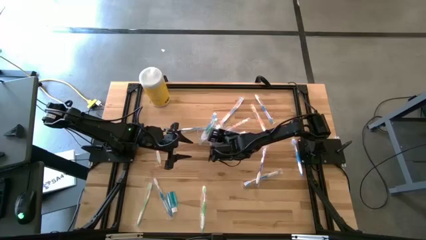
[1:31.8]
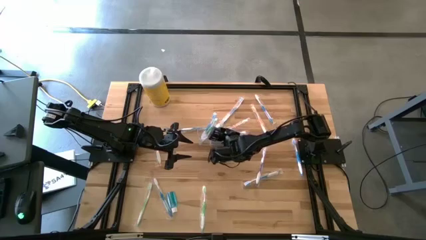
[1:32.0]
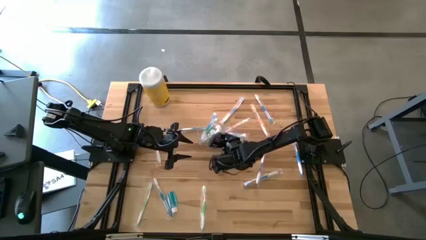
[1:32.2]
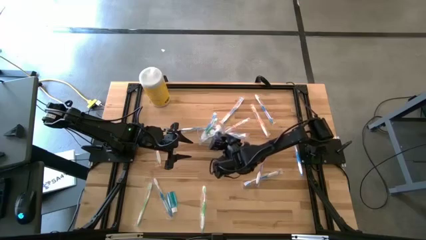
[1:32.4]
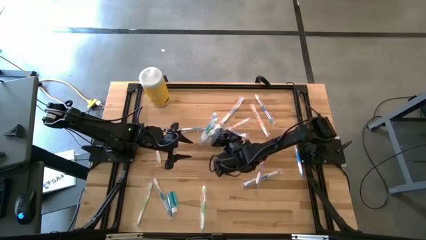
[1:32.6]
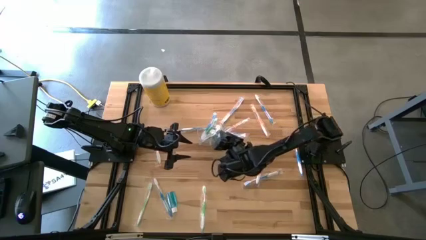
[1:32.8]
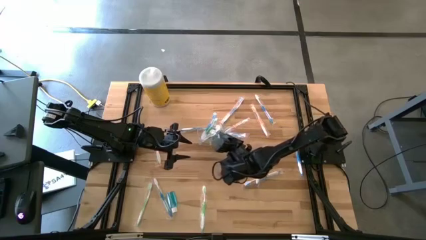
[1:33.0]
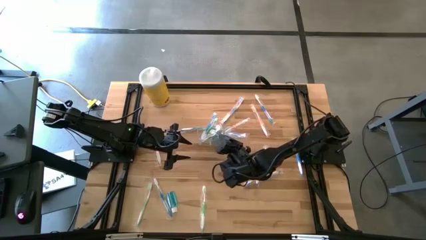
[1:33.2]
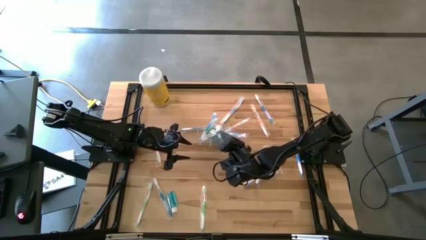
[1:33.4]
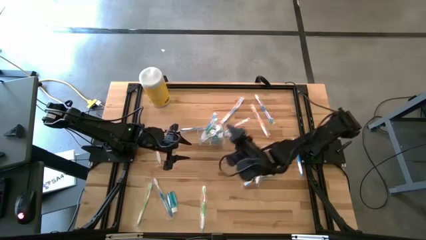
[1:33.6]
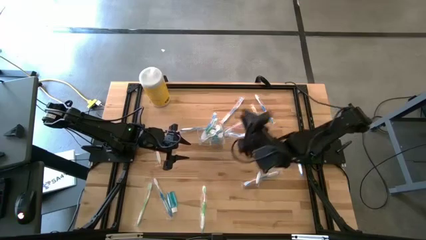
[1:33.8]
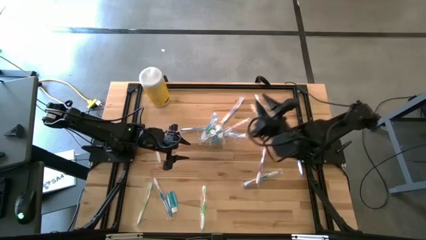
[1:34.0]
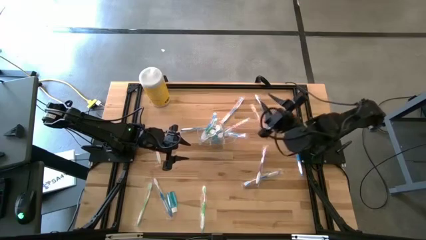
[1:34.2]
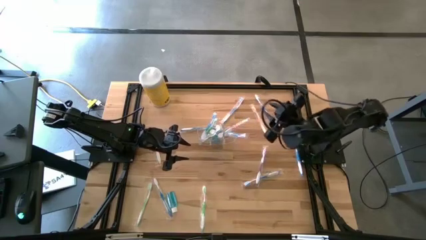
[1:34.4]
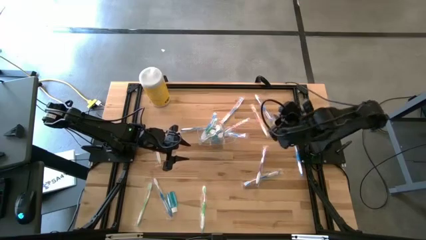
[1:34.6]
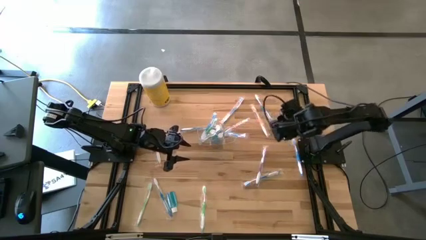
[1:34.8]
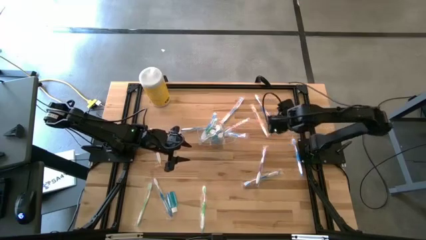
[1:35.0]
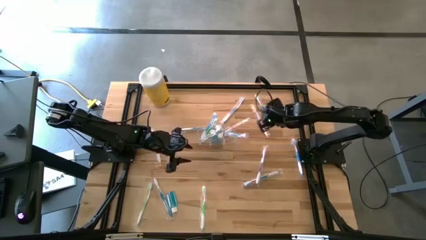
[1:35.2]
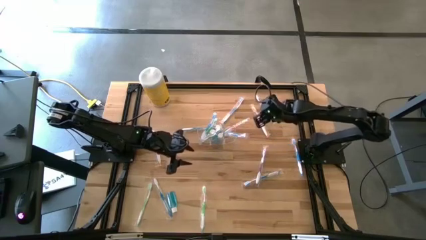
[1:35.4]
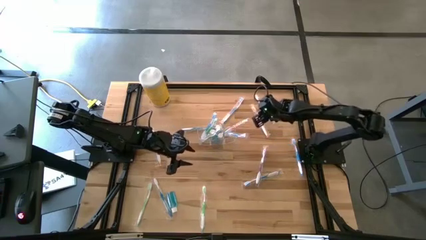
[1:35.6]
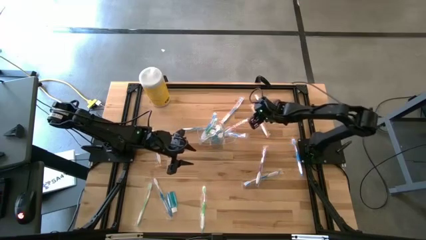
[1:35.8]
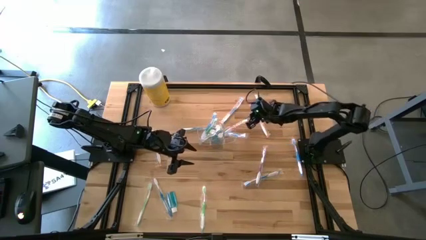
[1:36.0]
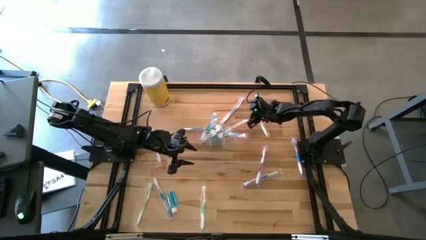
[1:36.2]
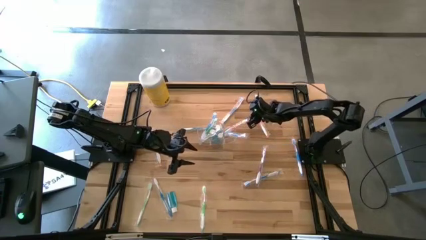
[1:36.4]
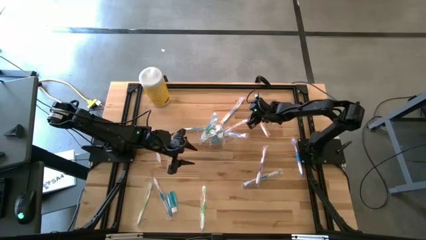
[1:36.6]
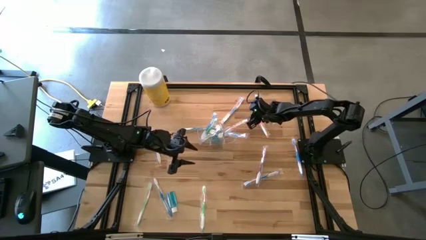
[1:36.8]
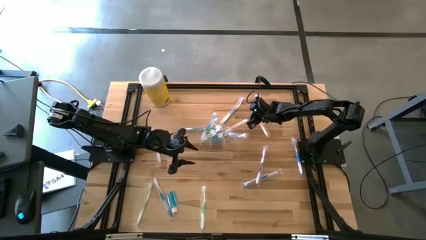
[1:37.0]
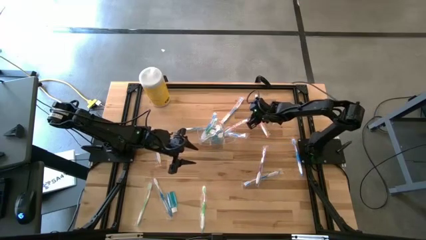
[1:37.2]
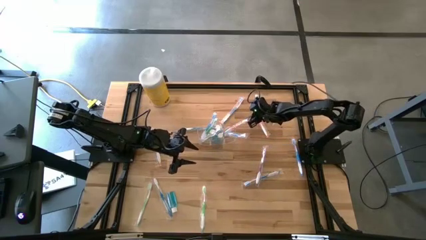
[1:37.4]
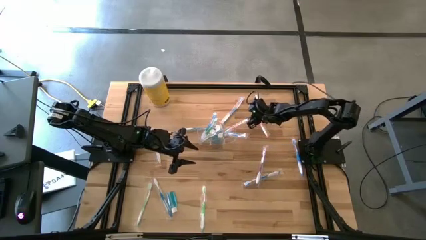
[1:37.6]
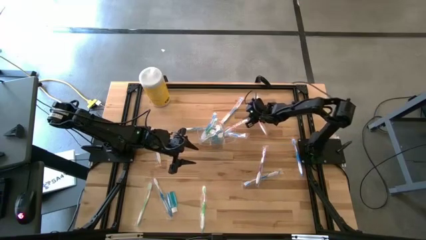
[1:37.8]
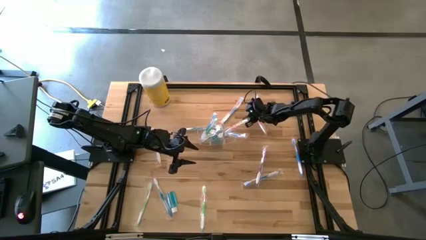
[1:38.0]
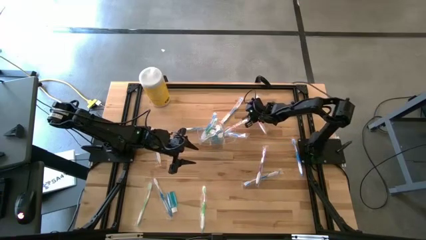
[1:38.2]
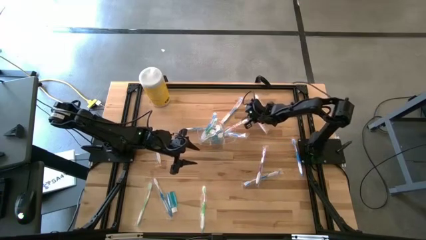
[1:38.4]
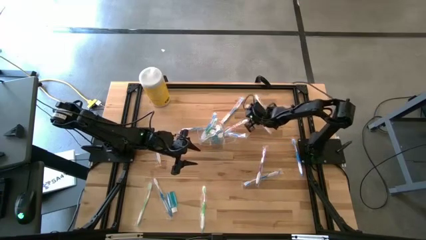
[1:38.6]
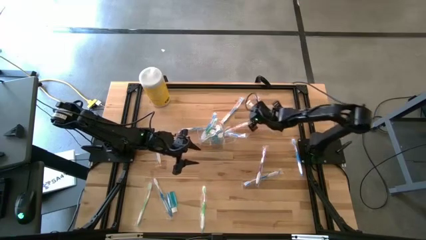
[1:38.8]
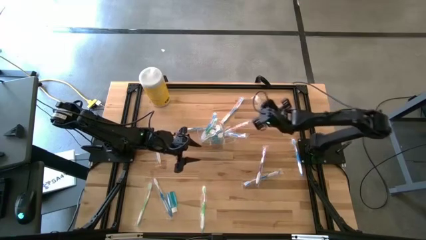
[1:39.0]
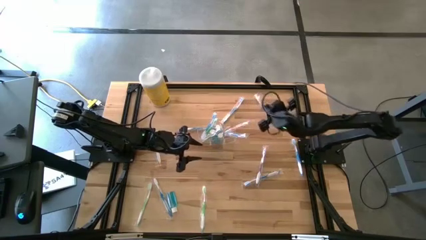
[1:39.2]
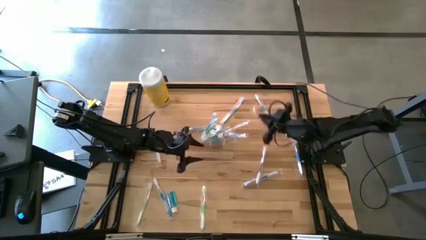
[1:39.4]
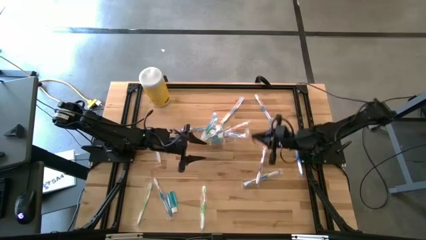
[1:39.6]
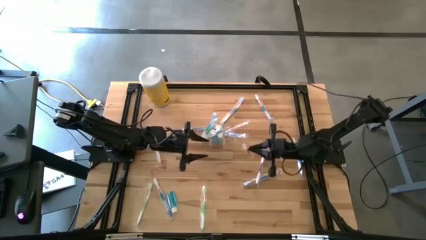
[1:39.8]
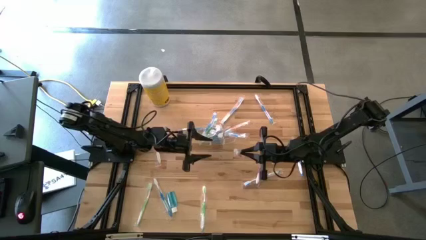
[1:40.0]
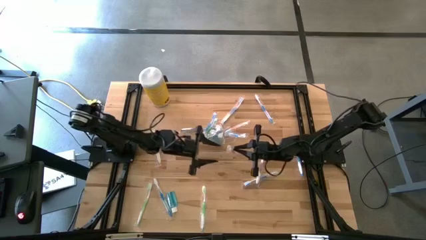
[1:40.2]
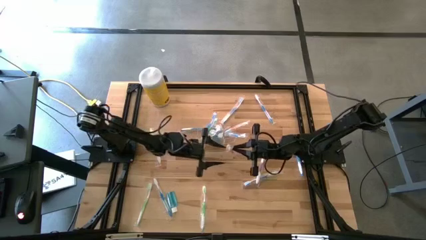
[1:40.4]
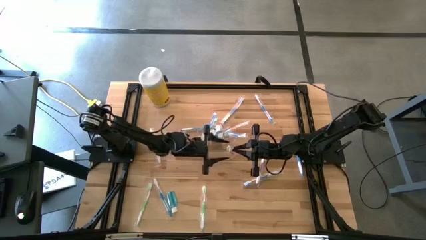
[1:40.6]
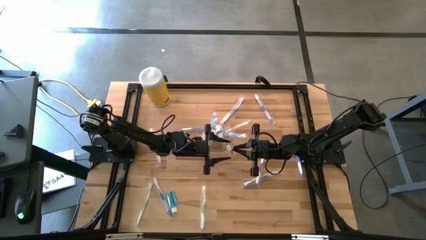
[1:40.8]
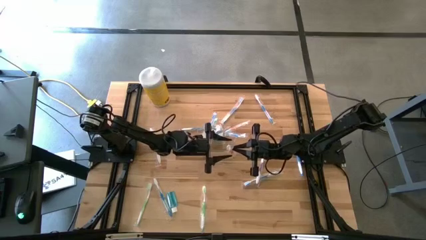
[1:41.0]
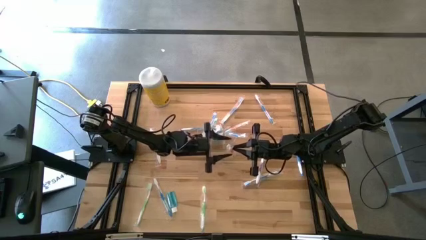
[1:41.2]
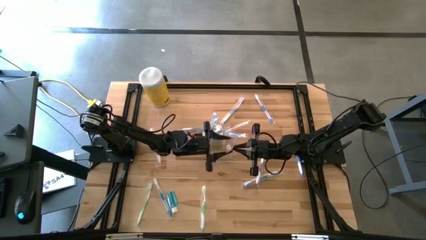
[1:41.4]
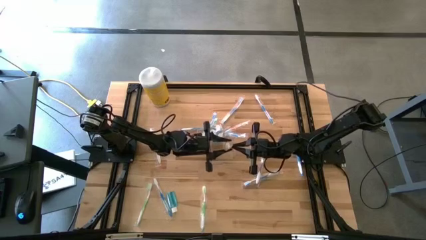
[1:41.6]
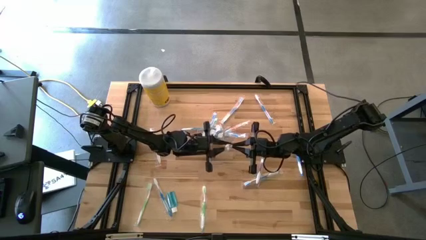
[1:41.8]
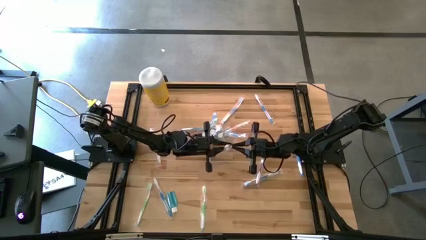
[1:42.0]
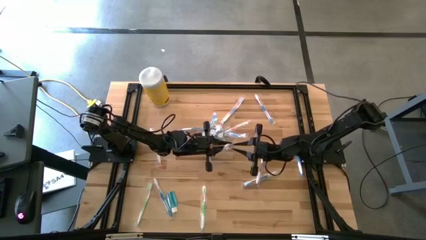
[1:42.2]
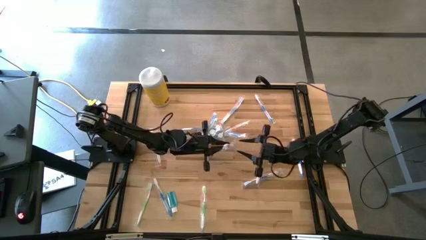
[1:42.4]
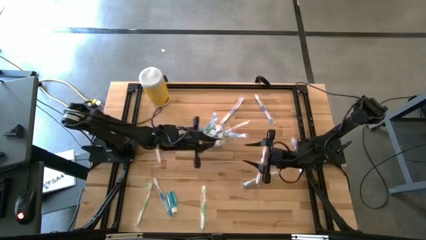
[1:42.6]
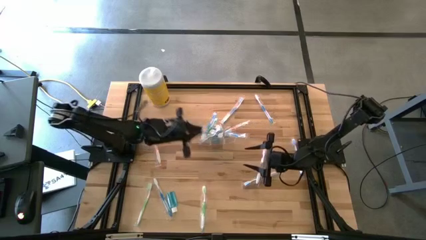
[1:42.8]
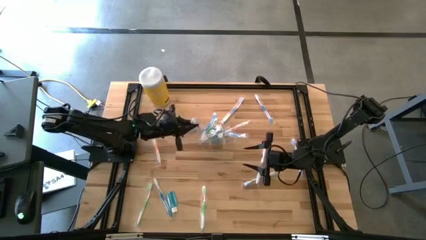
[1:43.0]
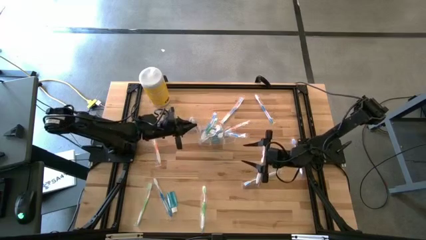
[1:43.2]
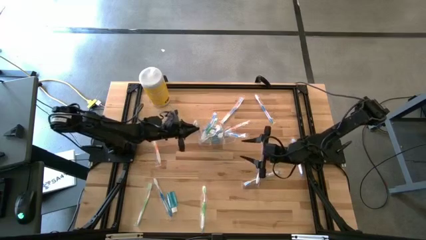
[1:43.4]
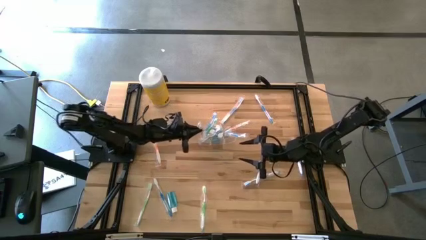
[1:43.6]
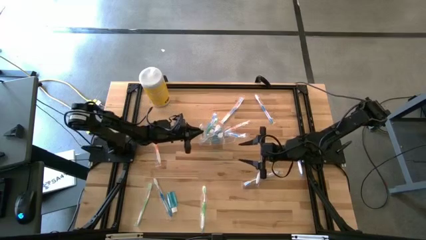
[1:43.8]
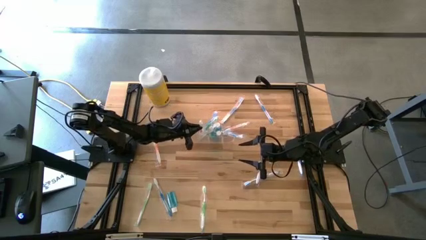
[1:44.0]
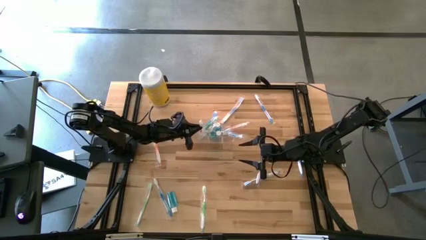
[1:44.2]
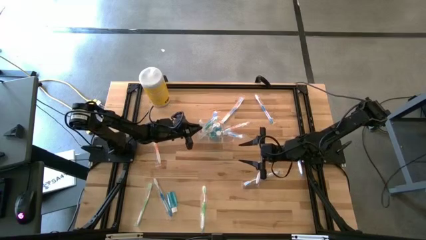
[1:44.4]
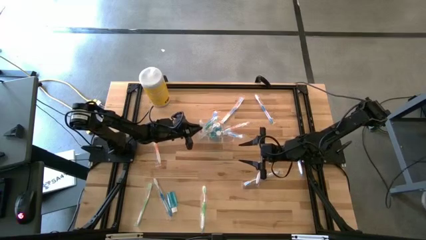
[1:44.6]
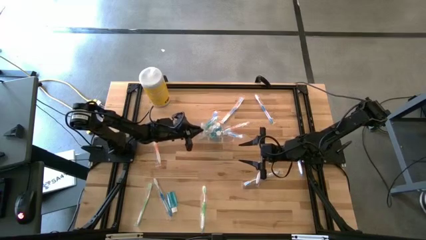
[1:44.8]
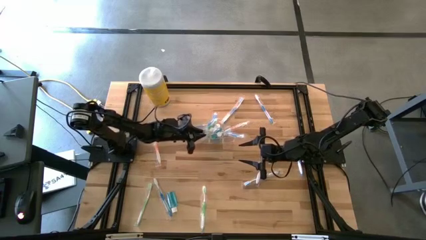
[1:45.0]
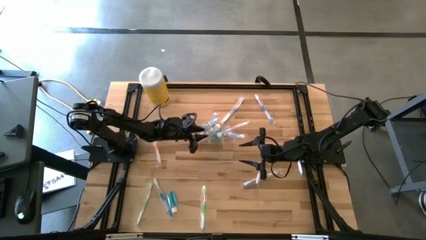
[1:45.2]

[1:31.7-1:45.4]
Task: Pick & Place toothbrushing station
Put the top orange toothbrush into the transparent organizer

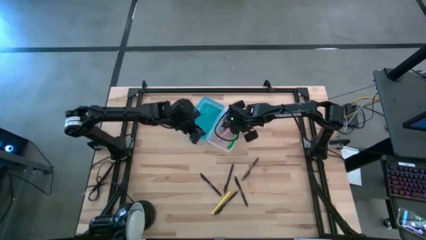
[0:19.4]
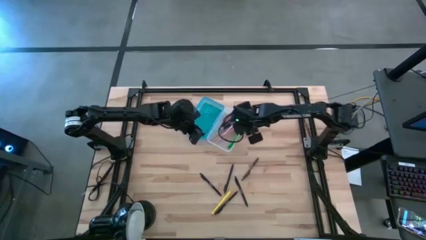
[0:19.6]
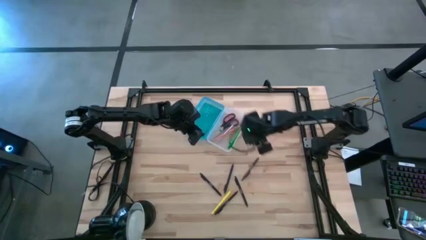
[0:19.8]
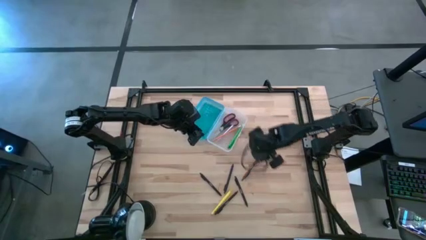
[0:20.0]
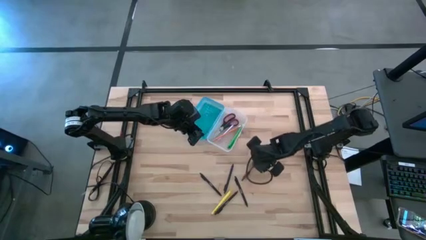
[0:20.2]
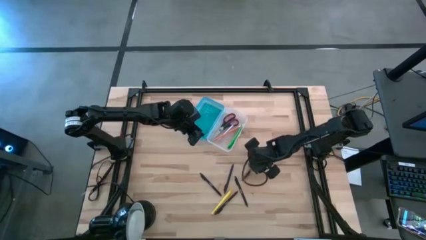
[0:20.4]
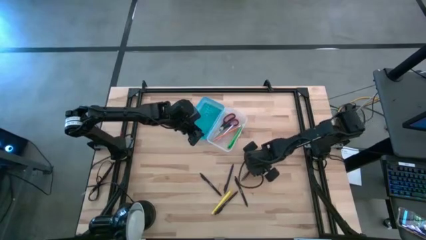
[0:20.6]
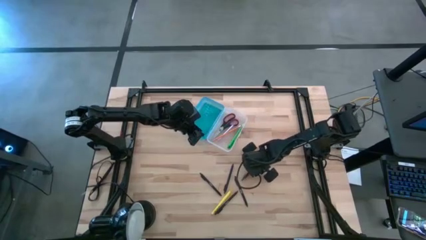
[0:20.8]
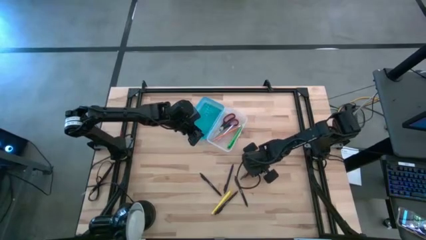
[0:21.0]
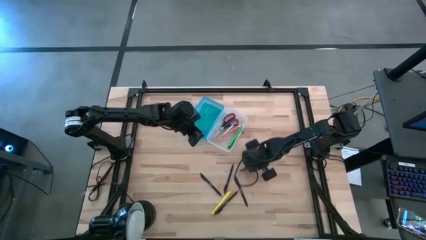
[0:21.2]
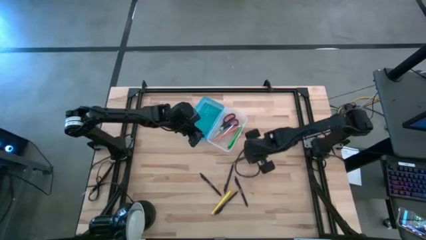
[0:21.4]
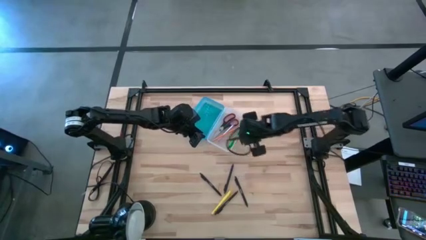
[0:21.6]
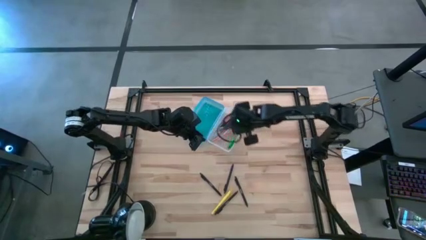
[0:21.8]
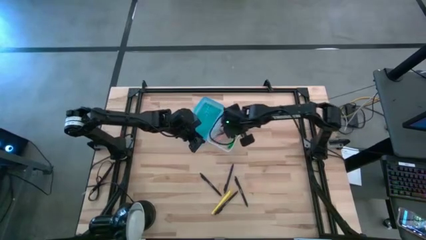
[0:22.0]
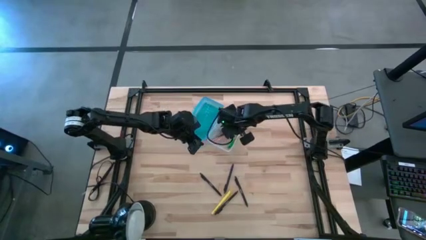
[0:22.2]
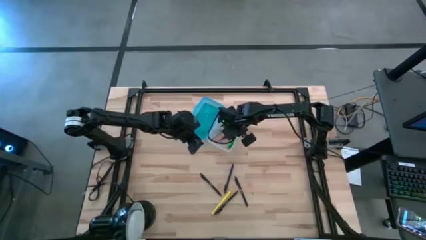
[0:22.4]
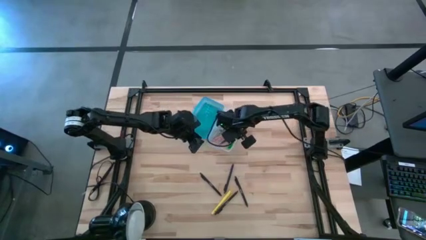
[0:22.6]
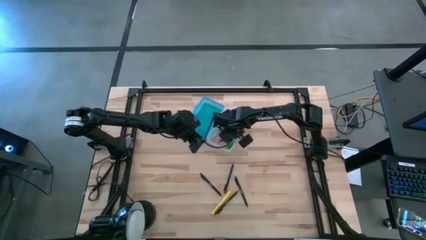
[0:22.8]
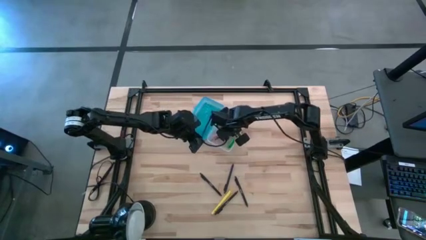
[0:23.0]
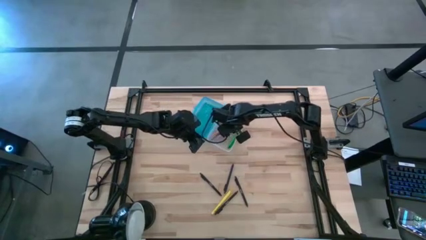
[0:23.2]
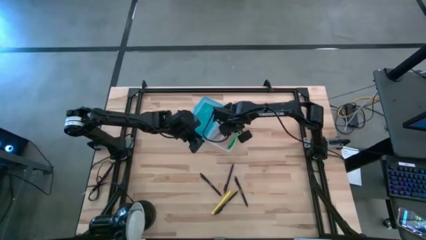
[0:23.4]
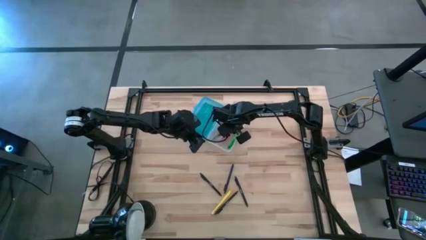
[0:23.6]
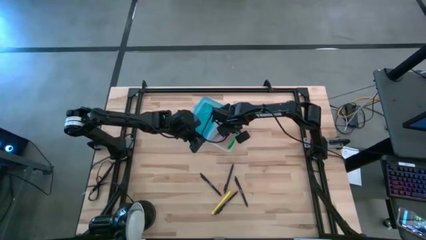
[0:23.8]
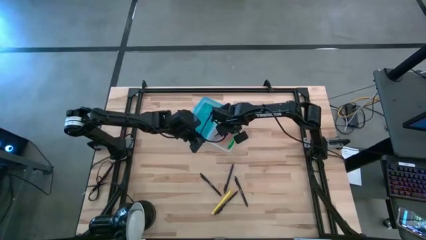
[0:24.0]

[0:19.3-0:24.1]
Task: Pick & place school supplies into a supply box
Put the brown pen into the blue supply box
